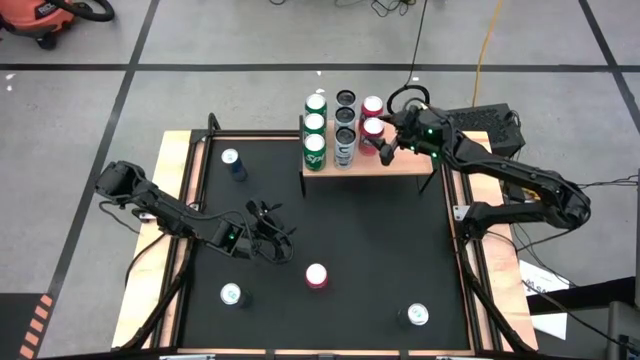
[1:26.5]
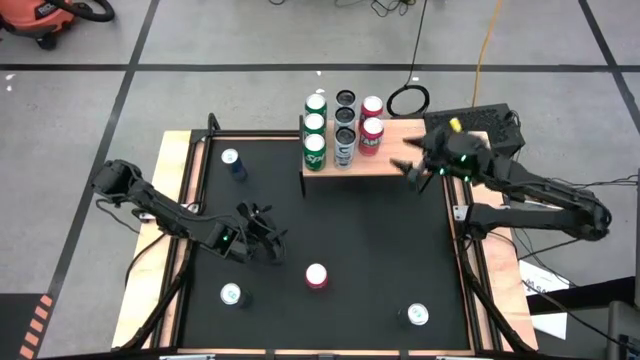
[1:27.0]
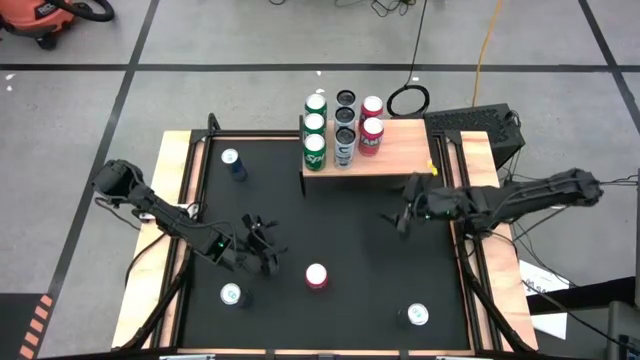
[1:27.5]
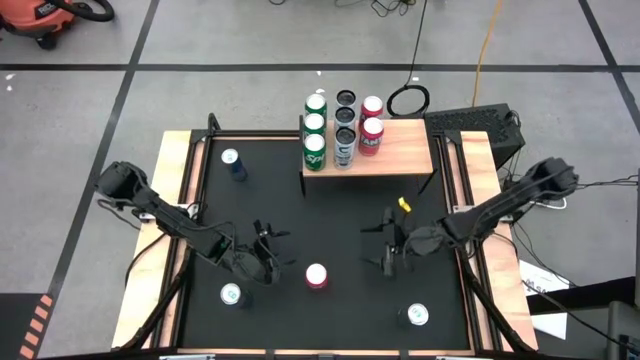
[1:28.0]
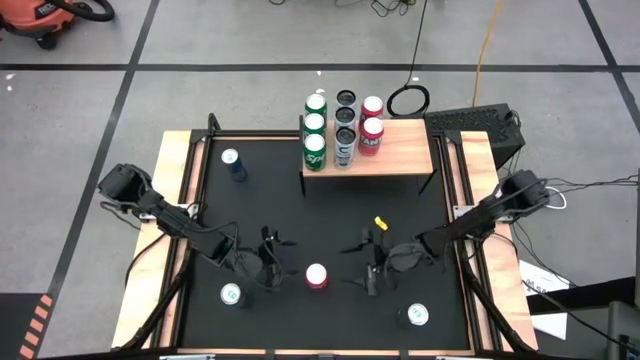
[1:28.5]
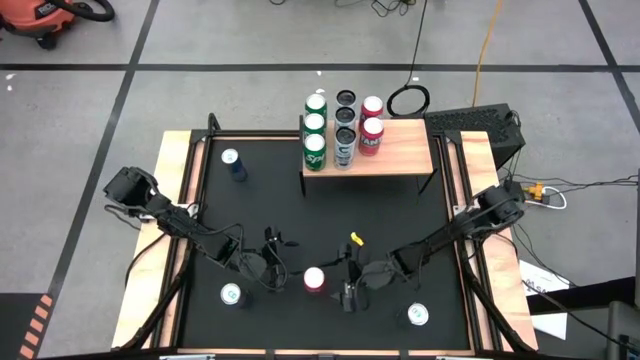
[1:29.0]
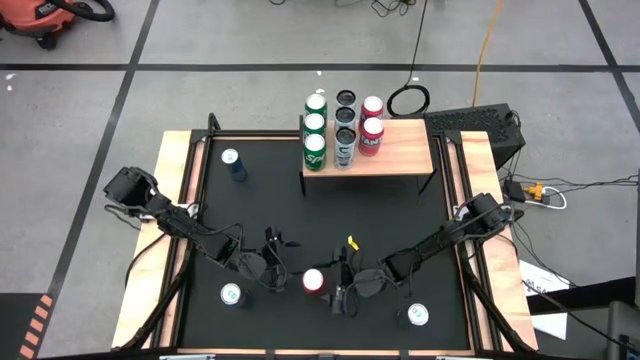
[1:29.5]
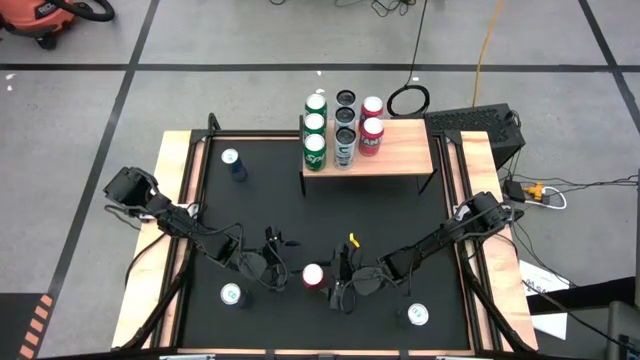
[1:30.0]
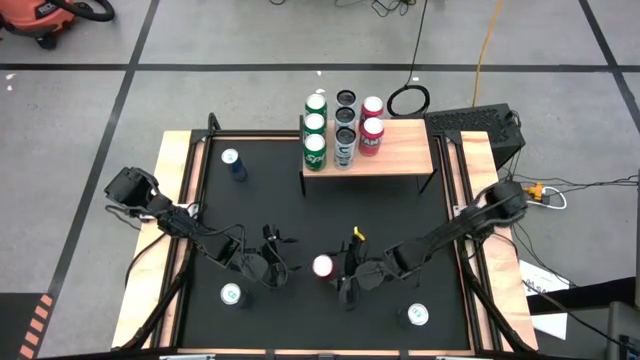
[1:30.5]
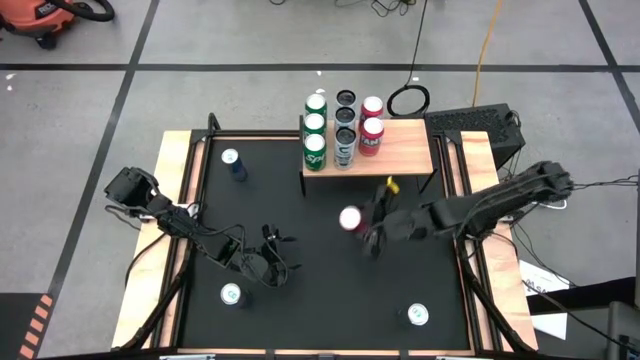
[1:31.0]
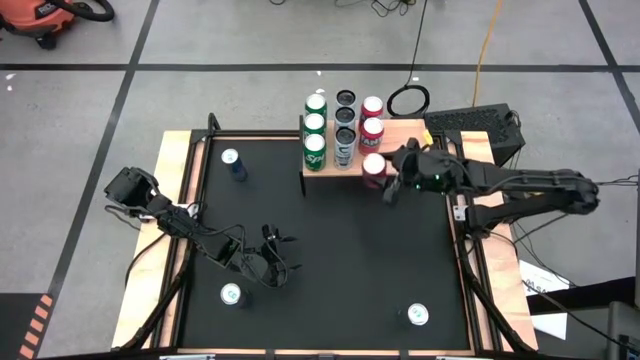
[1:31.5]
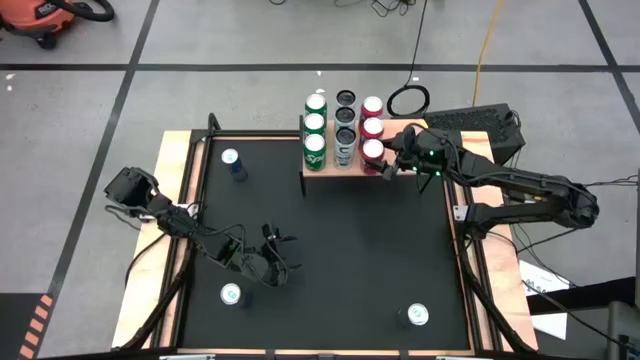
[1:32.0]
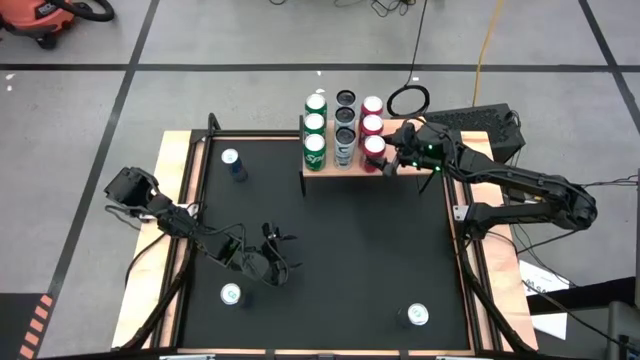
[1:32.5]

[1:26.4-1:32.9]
Task: Place canned beverage on shelf
Put the orange soda can on the shelf

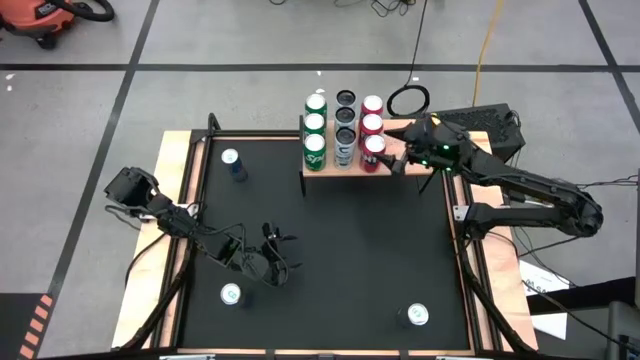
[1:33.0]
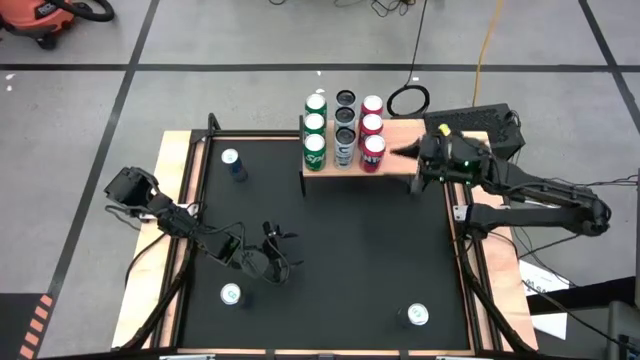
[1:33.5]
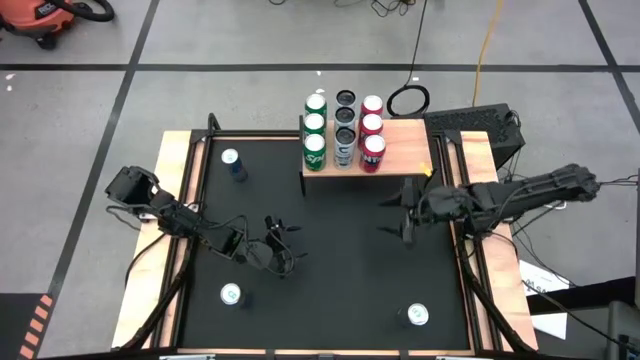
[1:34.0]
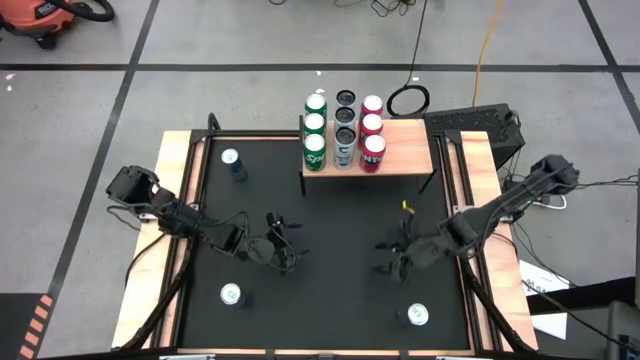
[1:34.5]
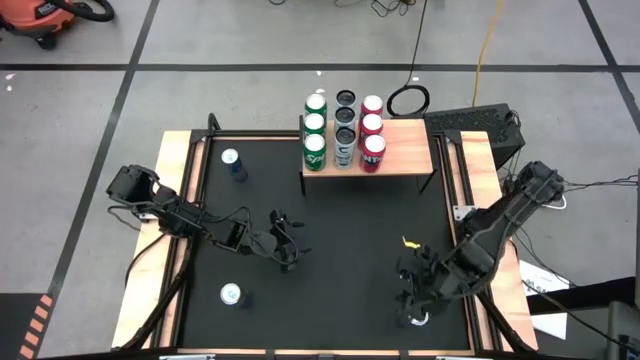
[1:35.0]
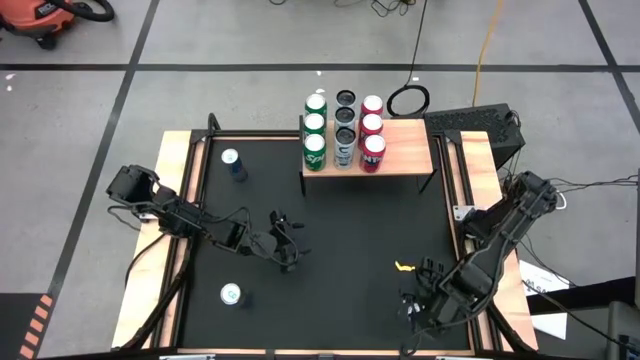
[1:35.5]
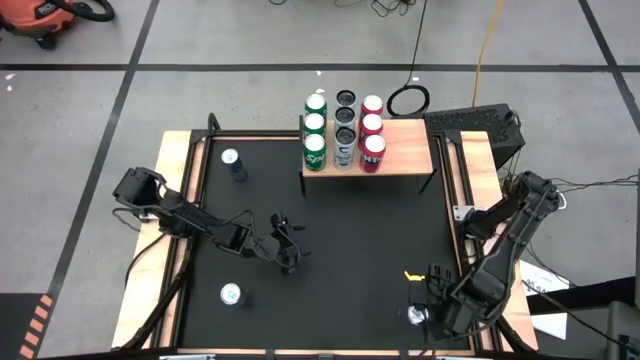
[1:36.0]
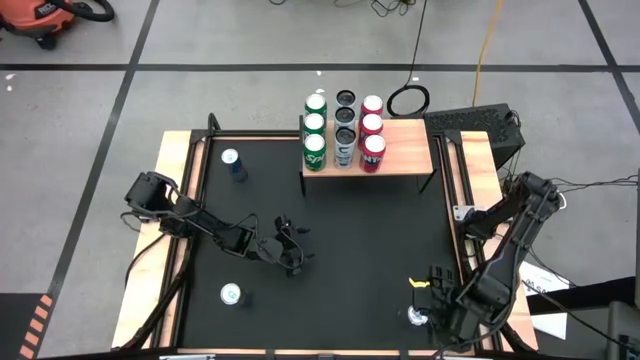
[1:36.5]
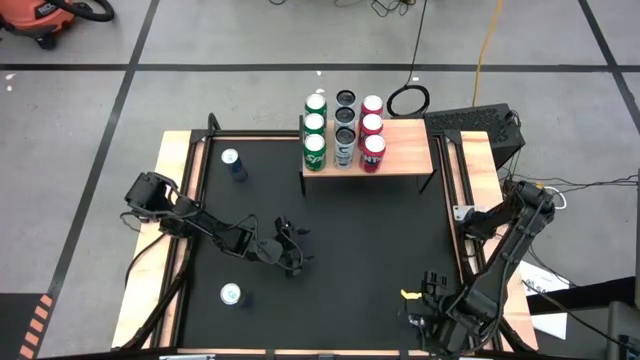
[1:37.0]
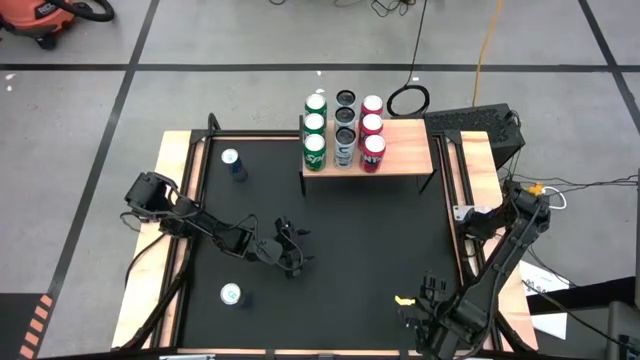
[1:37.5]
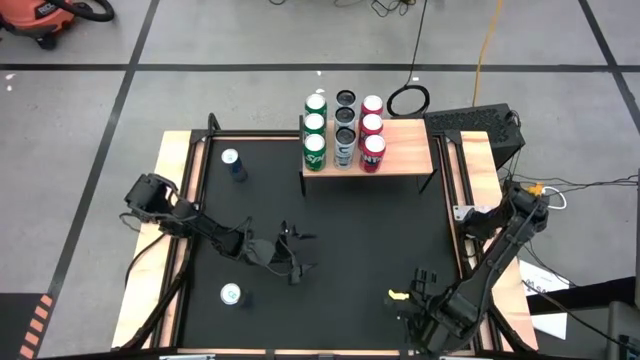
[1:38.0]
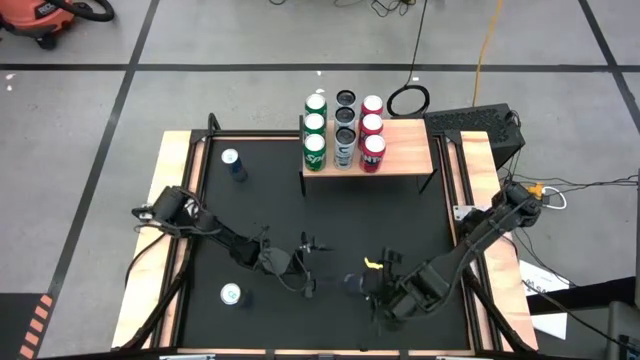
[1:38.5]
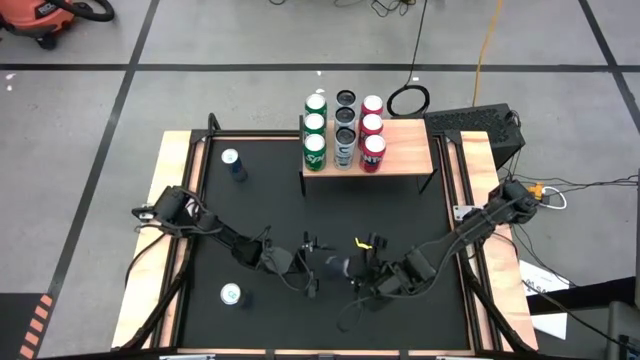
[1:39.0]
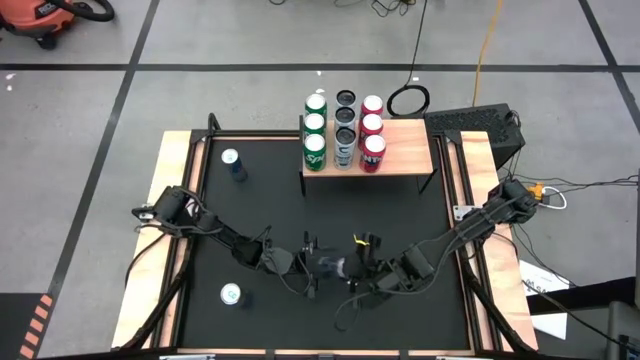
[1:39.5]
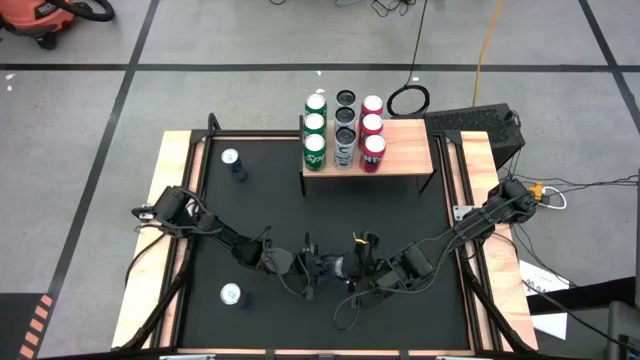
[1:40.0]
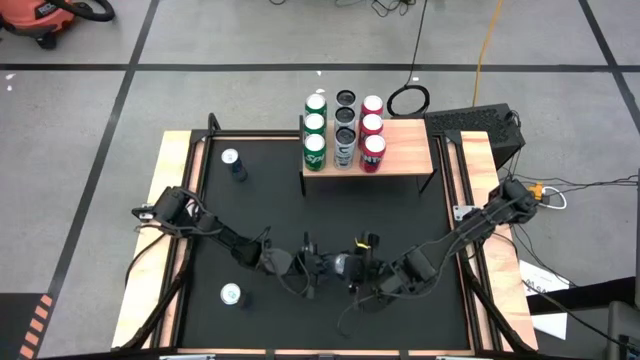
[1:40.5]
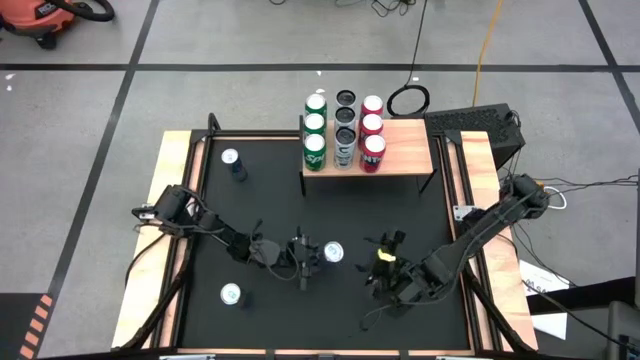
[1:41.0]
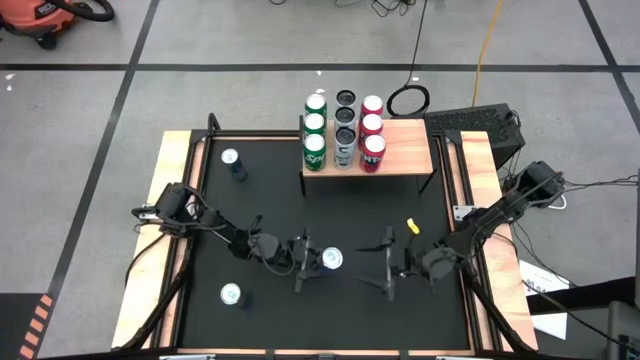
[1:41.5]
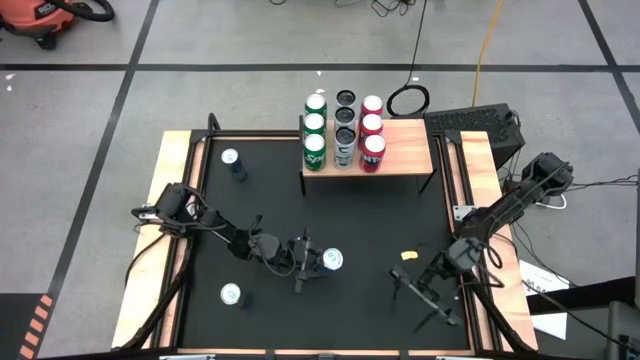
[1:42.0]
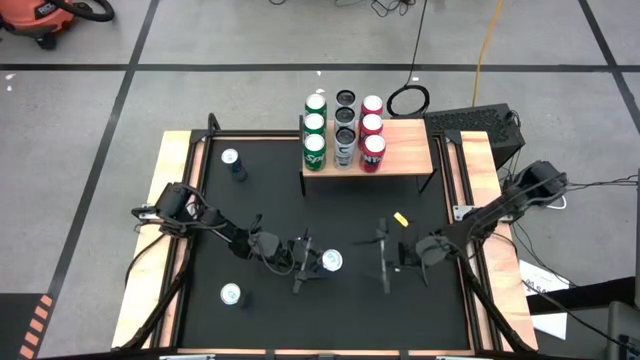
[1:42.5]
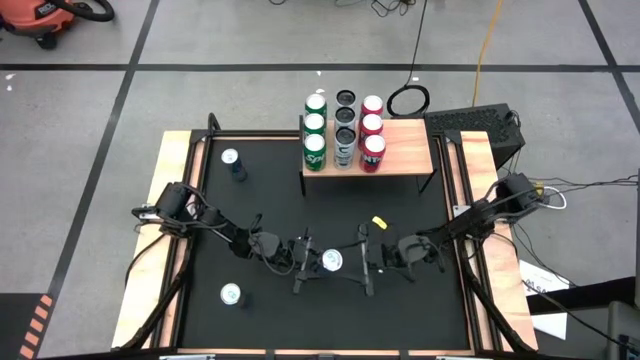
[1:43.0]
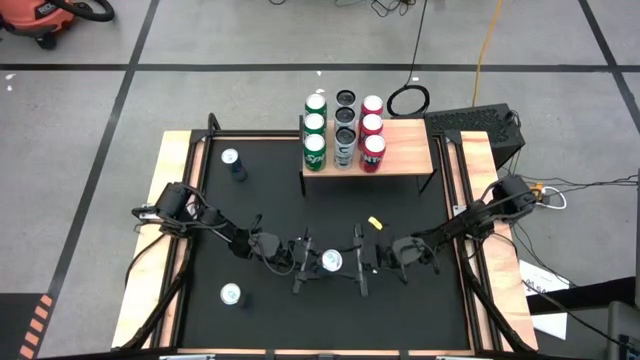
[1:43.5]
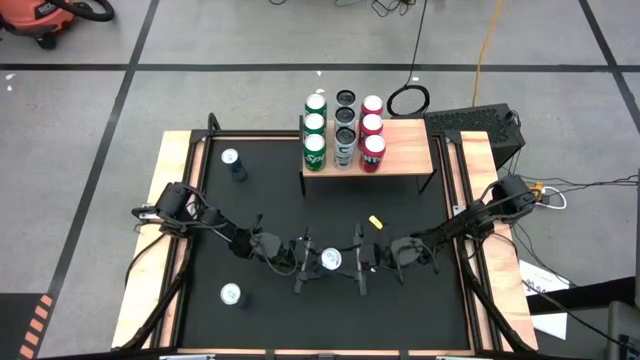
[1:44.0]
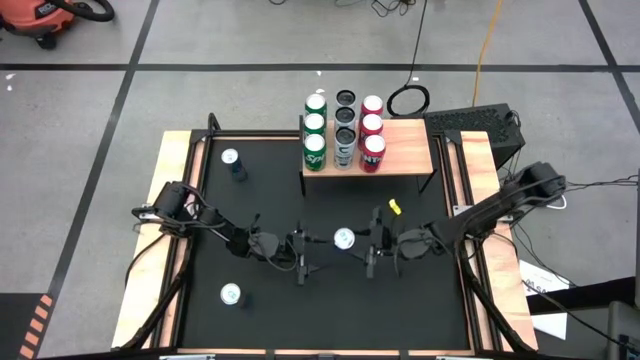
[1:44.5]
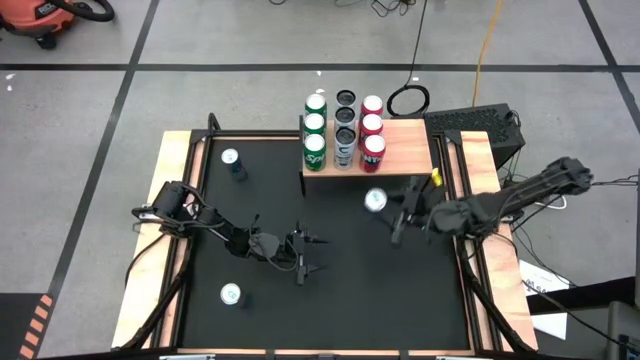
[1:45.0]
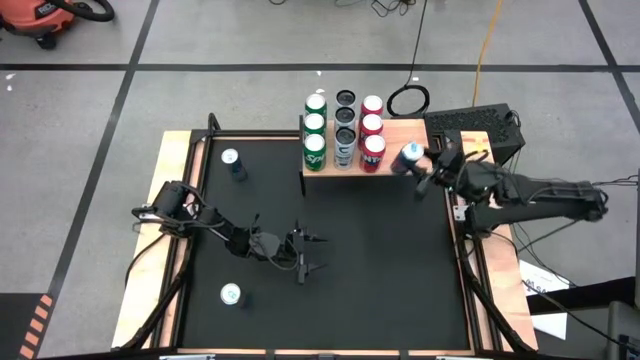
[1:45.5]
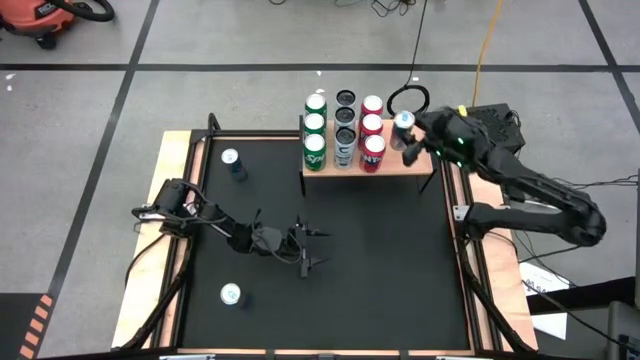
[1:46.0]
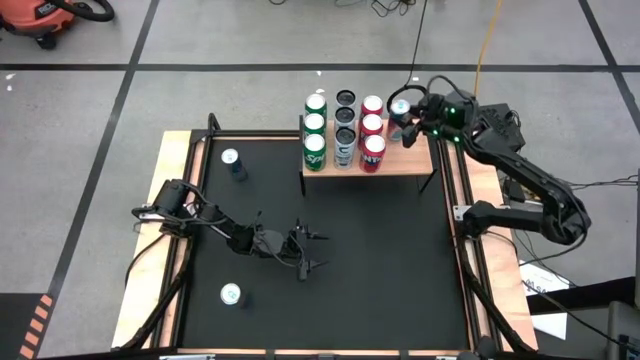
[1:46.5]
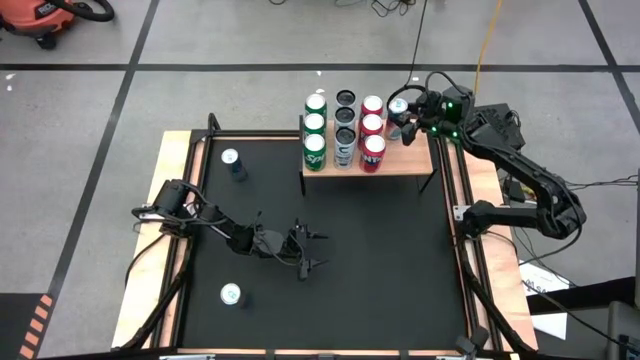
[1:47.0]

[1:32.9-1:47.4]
Put the right blue soda can on the shelf
